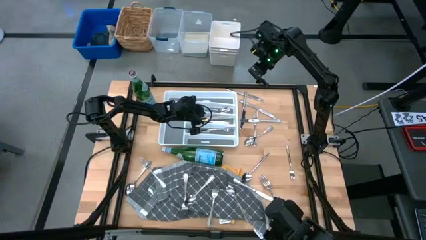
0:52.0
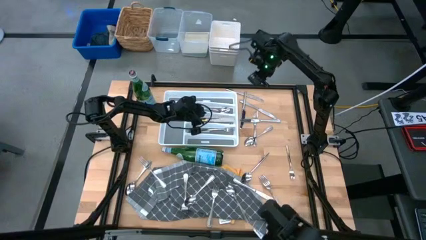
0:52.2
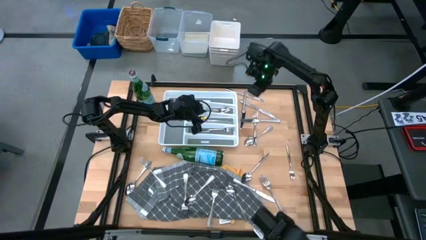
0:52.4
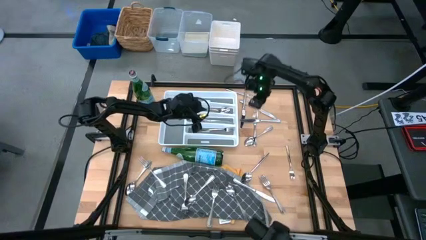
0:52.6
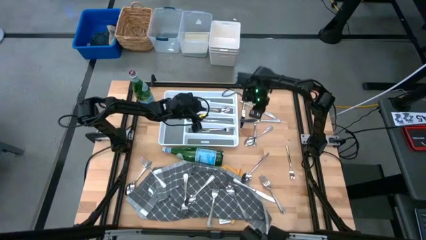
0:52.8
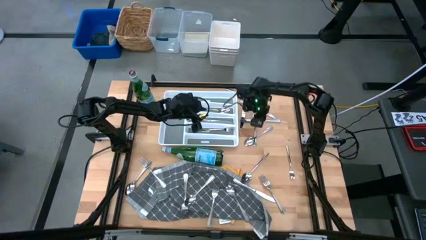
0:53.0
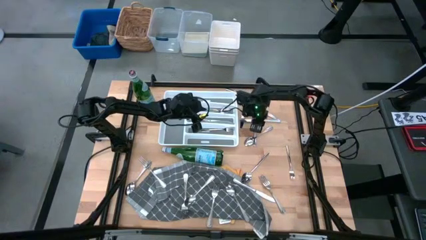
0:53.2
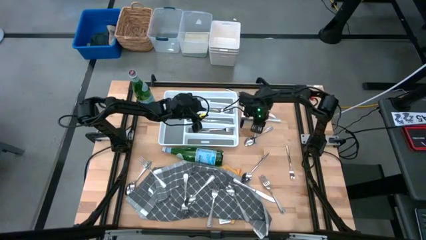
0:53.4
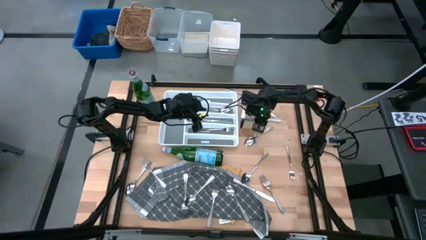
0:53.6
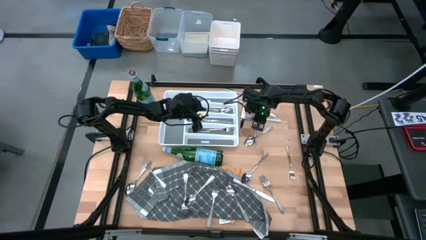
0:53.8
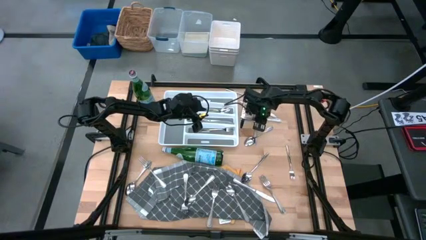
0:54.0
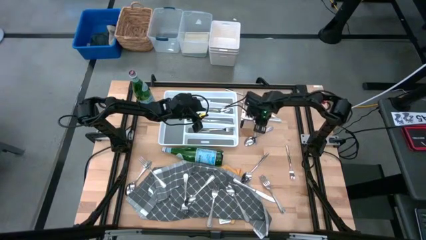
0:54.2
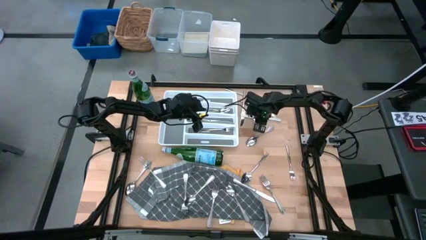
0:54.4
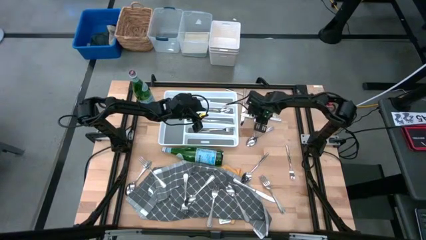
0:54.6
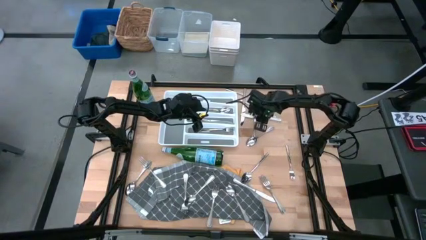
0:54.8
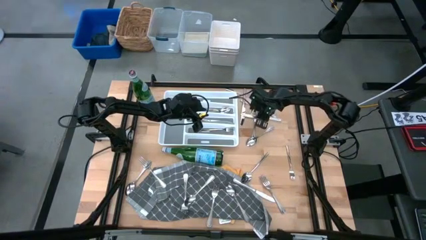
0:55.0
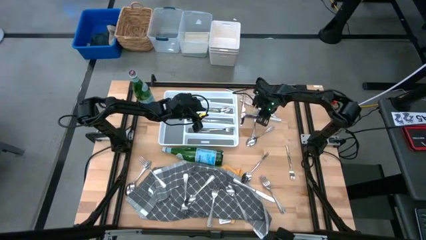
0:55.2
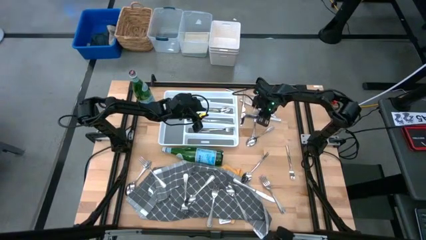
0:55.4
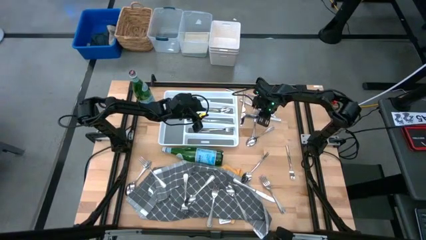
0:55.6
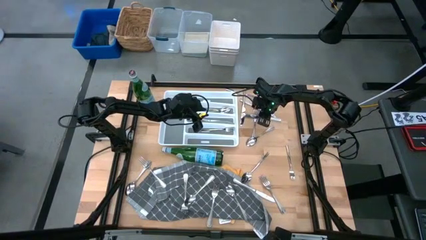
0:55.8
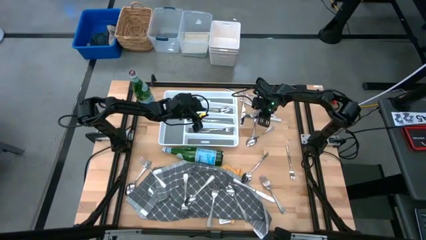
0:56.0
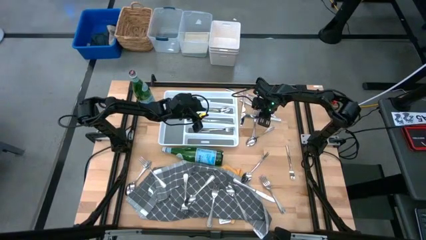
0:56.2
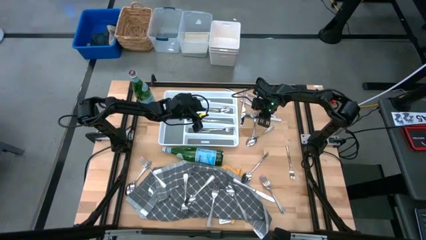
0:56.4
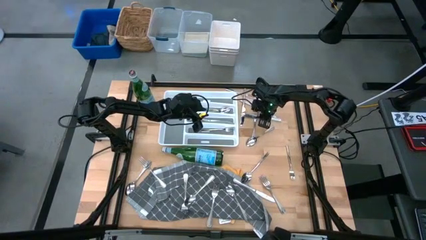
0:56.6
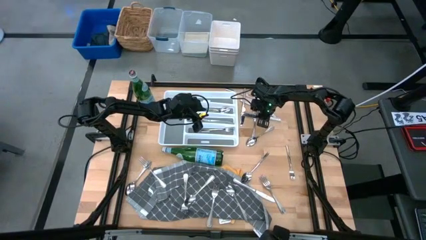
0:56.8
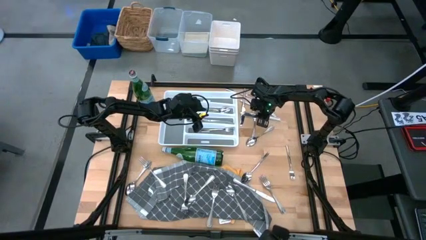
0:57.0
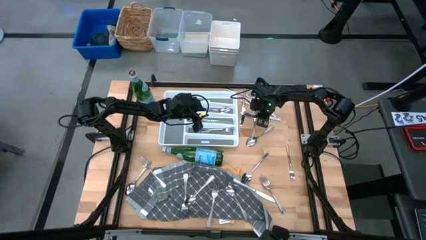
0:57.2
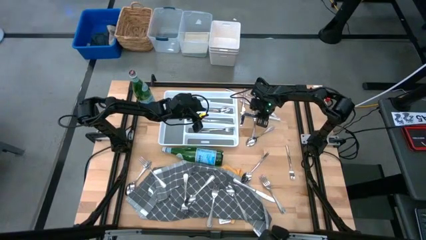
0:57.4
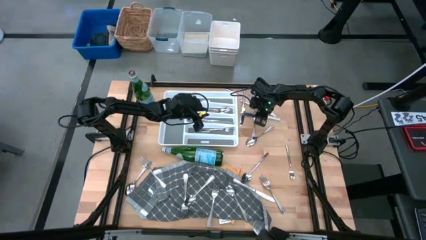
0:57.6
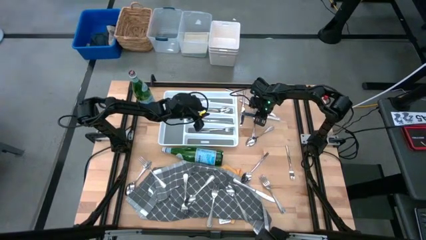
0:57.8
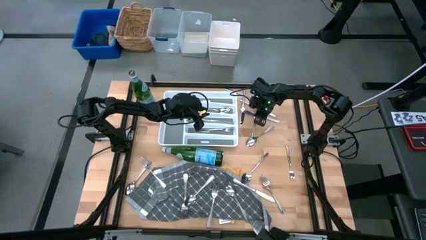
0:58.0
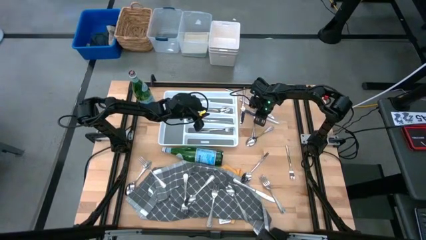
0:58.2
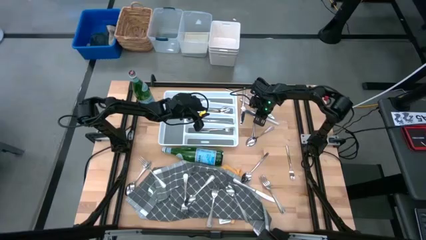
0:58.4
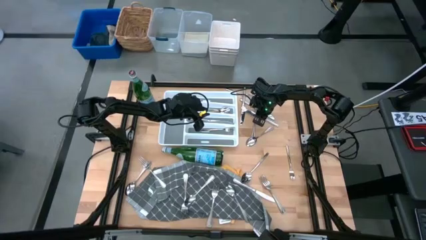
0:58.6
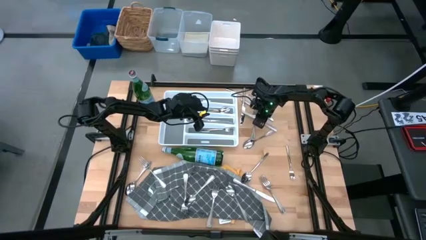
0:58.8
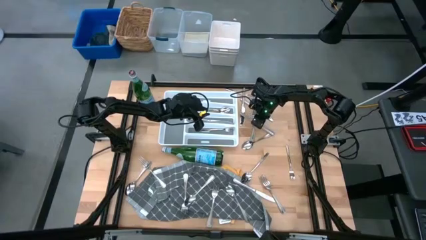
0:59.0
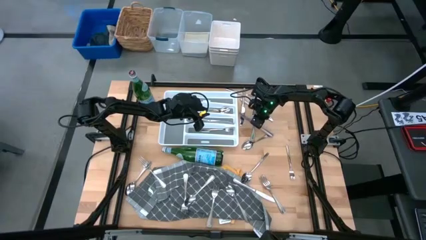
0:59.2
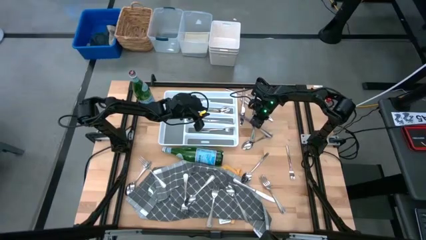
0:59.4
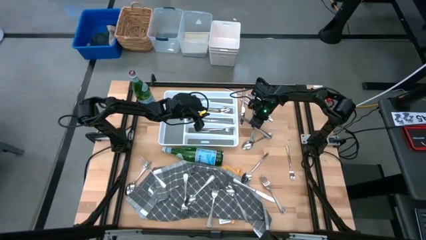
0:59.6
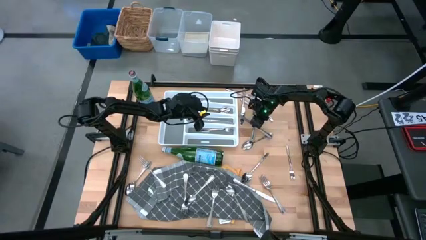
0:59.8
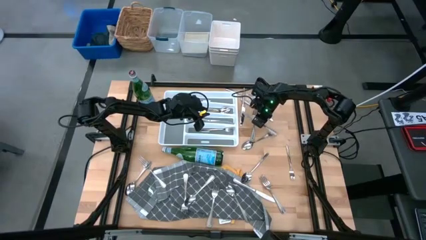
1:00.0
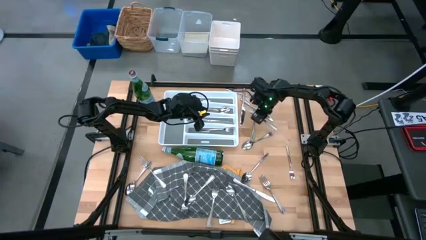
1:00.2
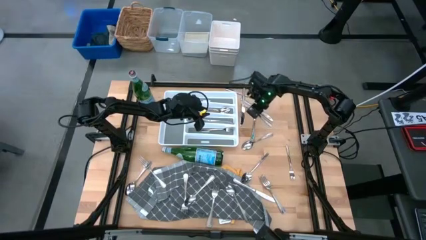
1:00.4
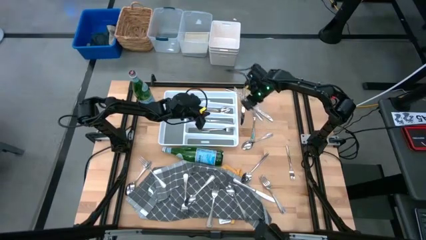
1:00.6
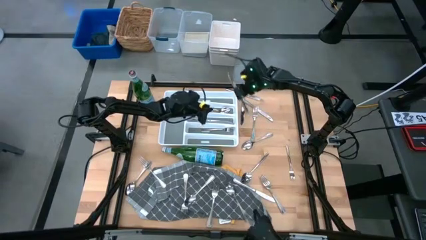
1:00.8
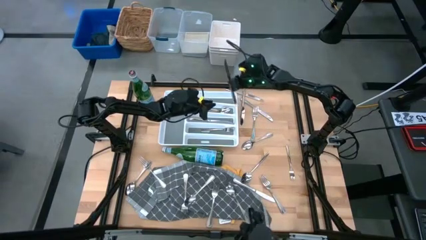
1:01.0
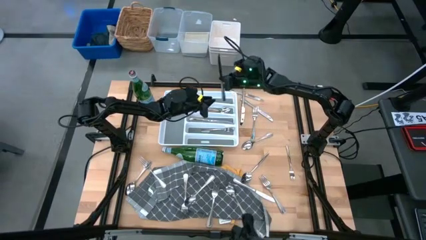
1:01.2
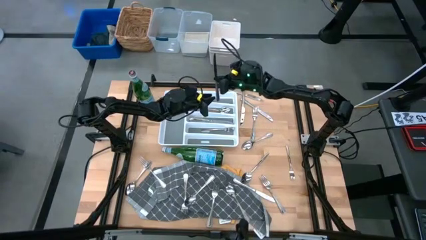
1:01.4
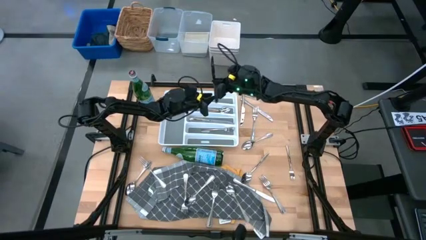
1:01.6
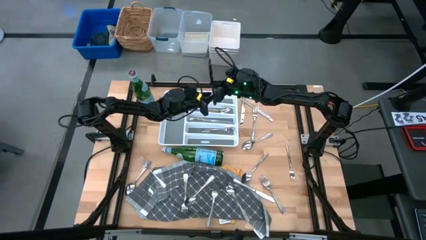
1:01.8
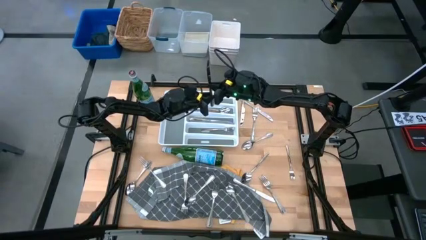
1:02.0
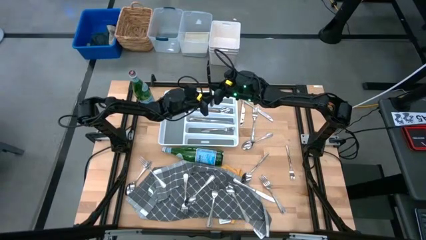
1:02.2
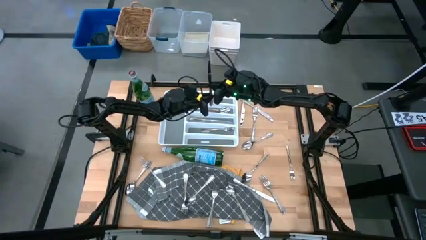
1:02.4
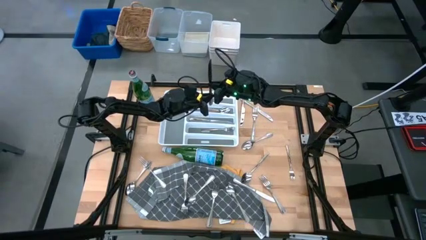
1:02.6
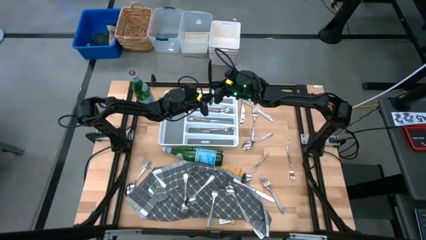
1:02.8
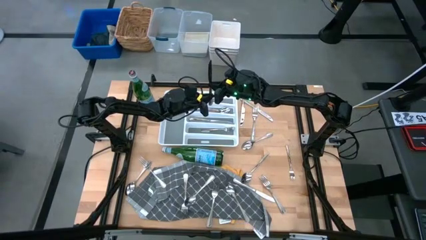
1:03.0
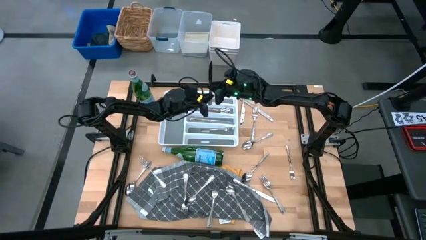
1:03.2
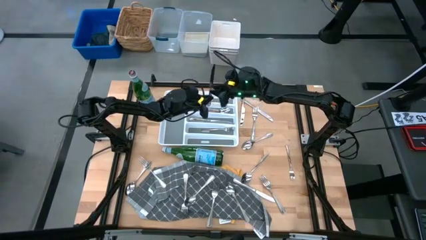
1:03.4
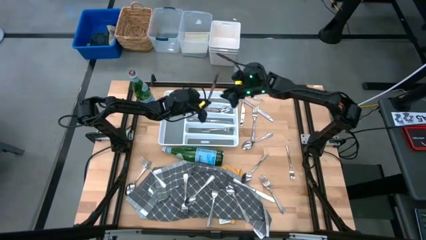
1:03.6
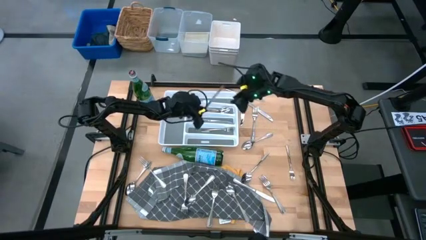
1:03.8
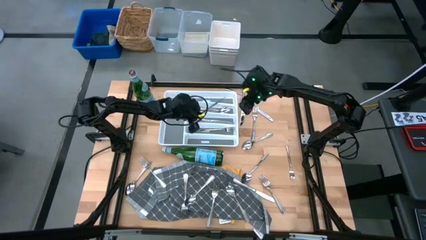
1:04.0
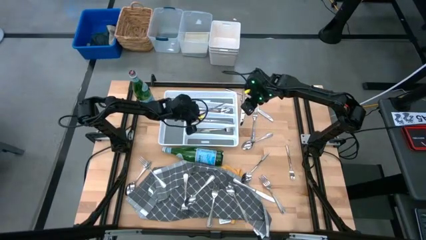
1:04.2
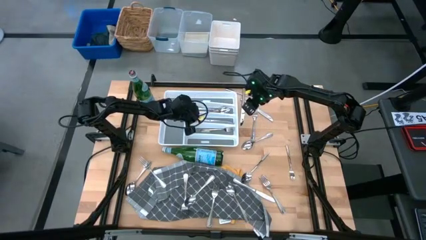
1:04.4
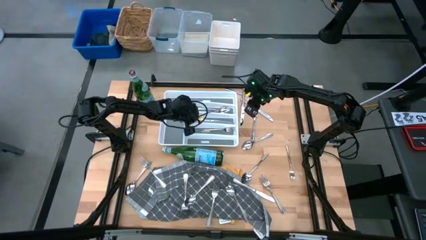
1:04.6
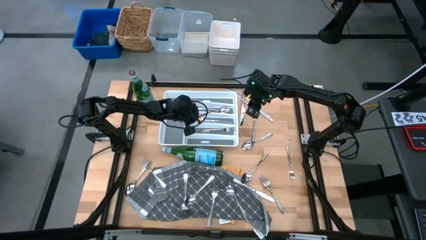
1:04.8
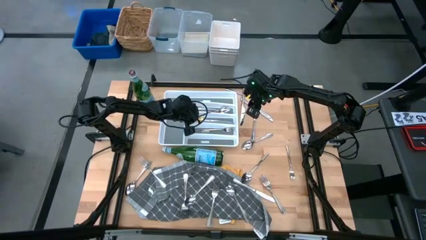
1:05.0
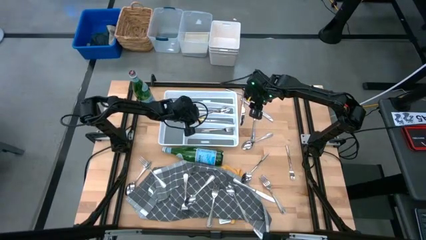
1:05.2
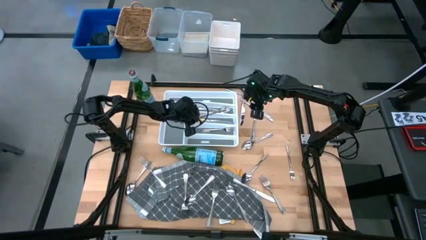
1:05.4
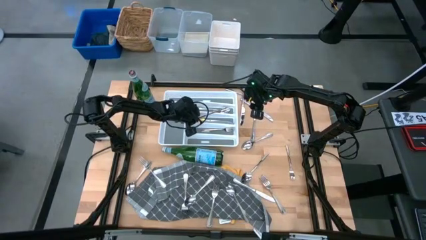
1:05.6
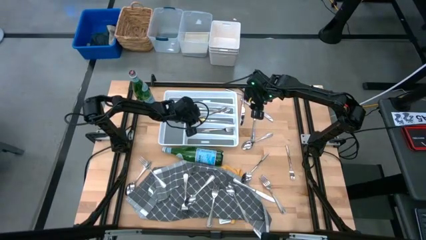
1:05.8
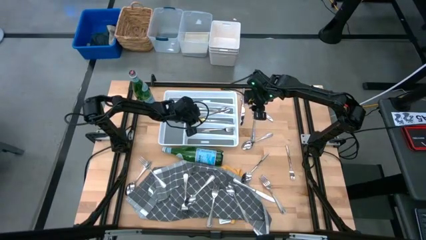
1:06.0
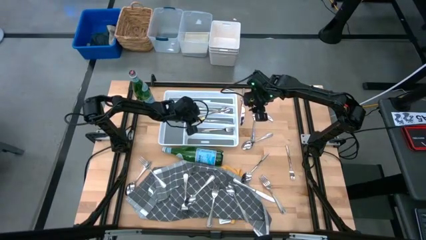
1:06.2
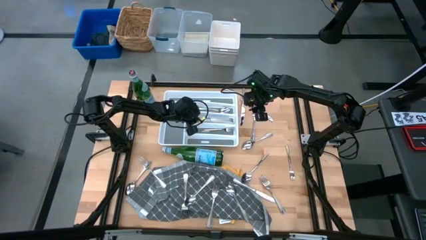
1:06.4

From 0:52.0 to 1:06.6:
Task: Sort silverware
Put the silver table knife into the silverware tray

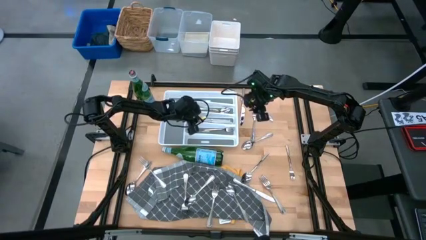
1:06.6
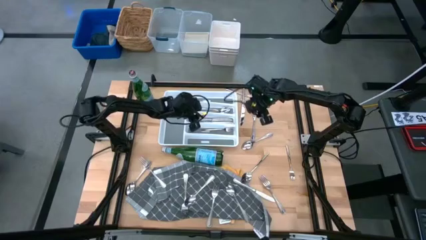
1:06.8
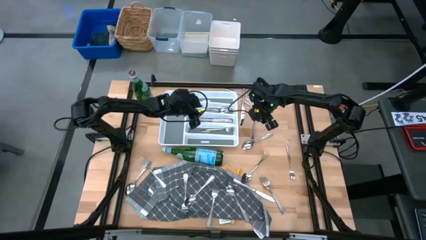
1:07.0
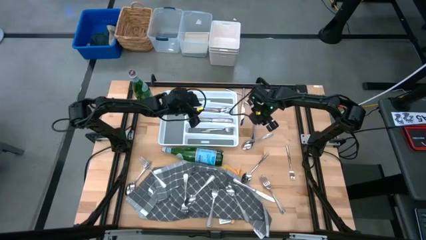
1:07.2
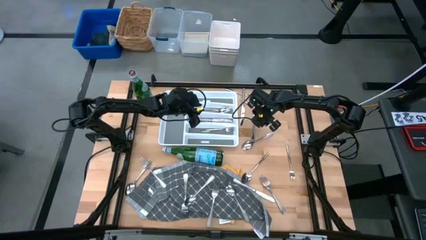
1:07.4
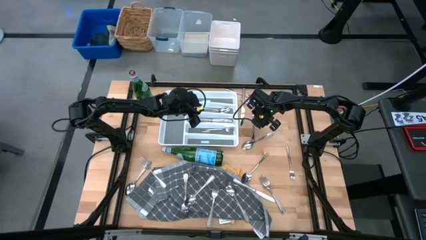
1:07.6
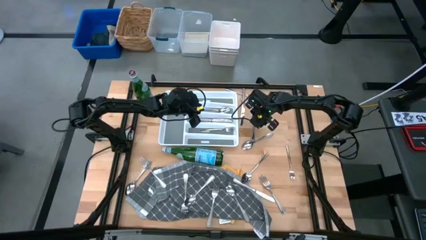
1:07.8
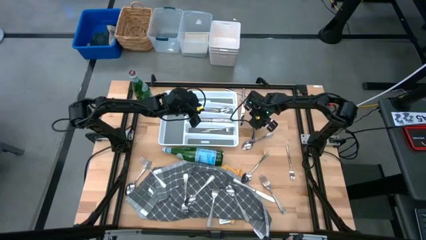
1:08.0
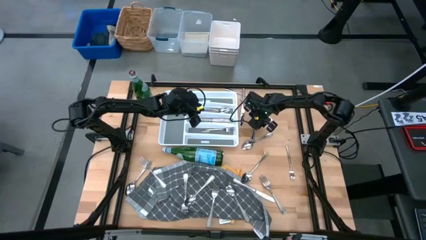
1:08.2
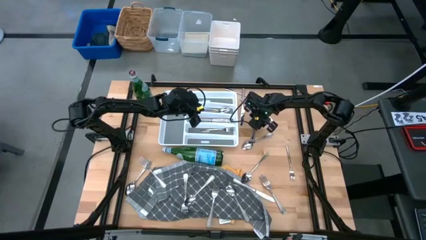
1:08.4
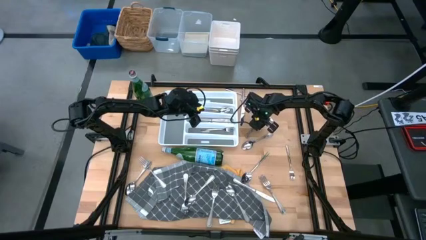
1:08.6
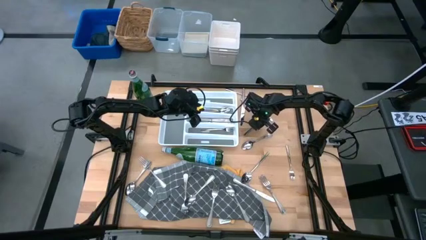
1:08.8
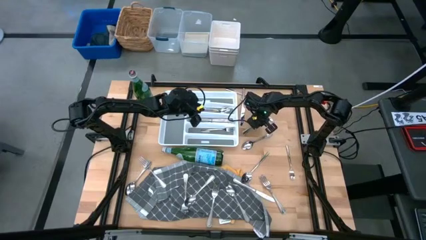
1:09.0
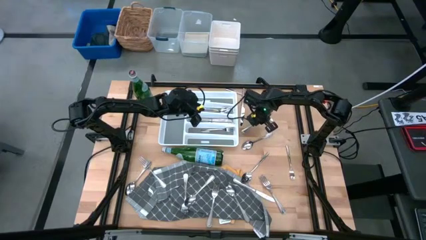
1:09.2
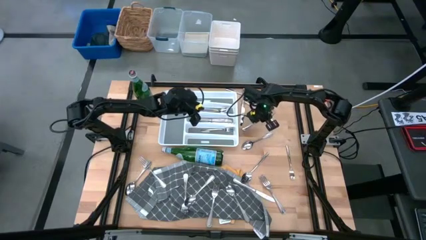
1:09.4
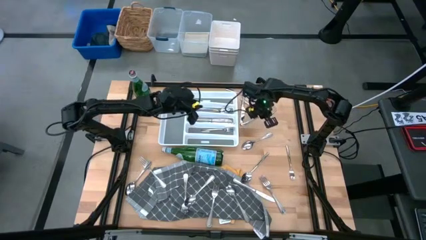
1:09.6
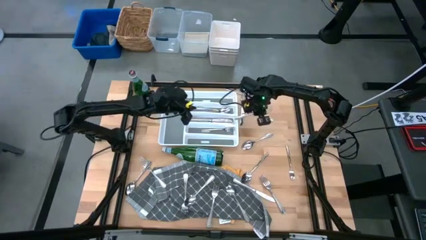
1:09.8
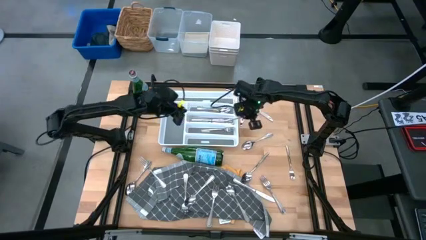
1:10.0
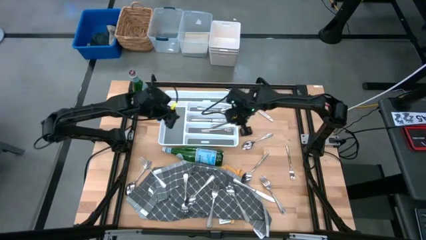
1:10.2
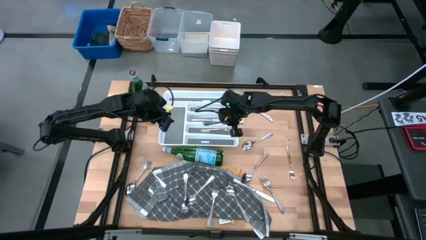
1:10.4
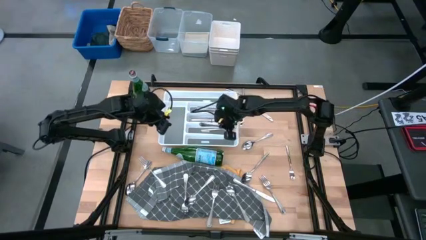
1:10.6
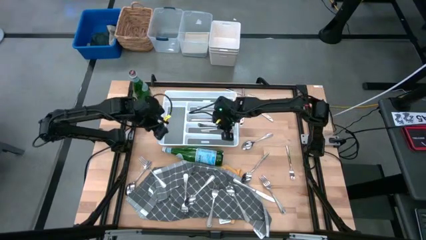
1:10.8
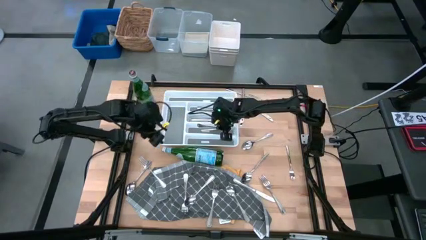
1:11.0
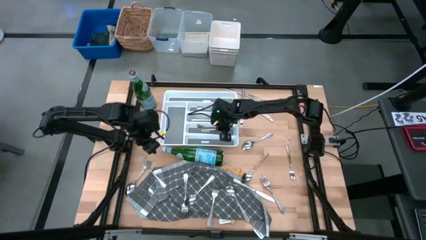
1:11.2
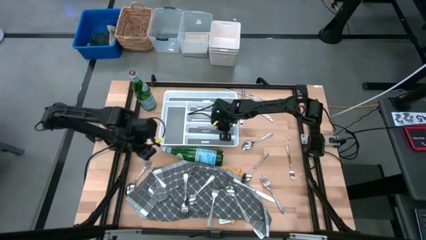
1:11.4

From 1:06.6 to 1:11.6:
Put the silver fork into the silverware tray
